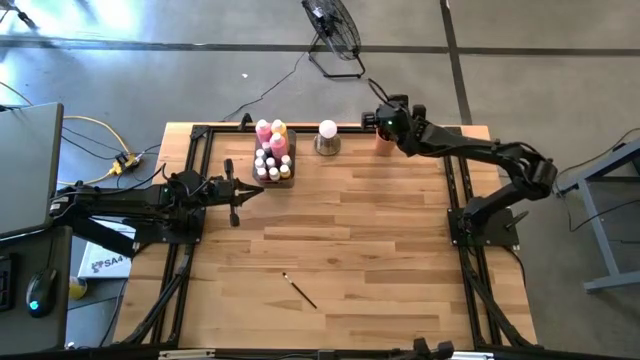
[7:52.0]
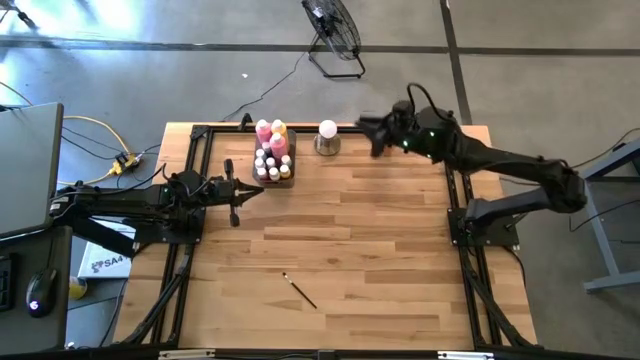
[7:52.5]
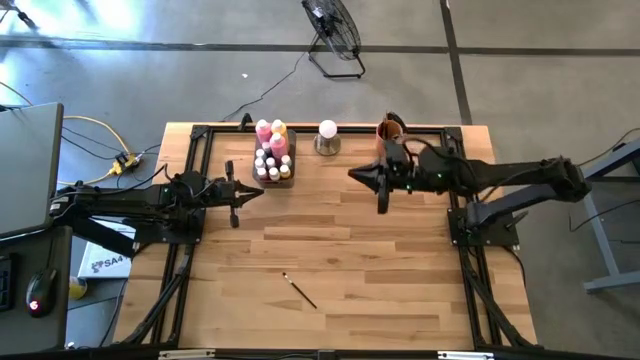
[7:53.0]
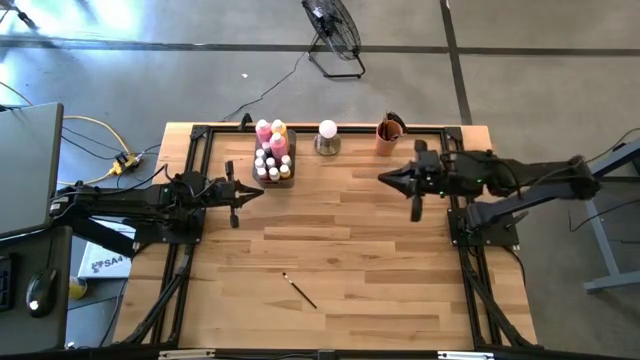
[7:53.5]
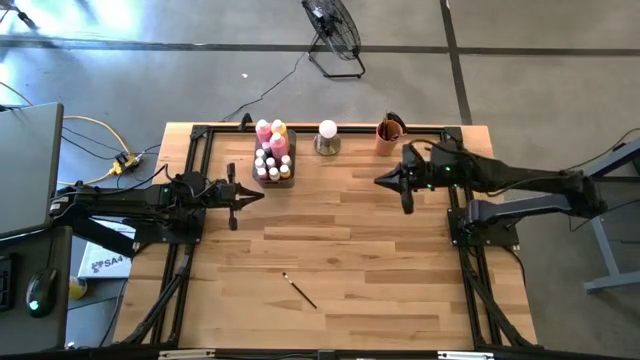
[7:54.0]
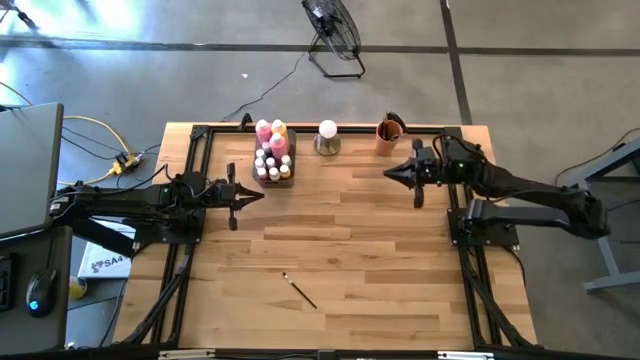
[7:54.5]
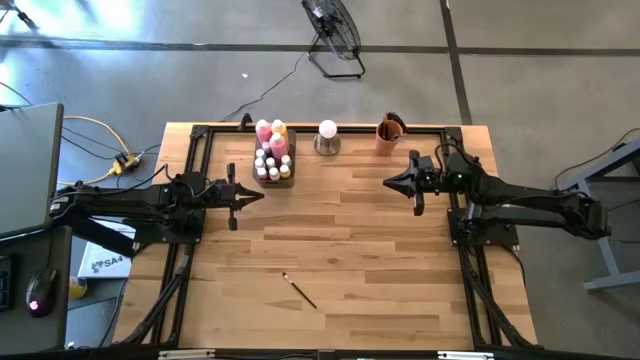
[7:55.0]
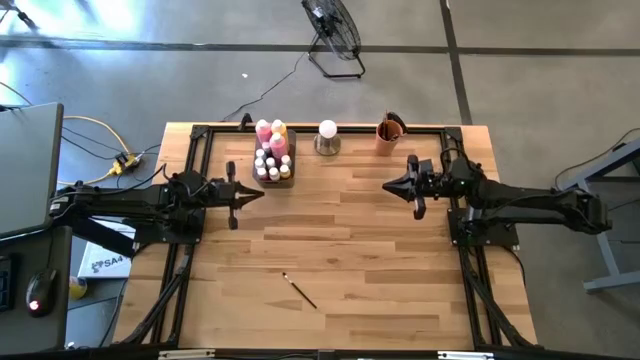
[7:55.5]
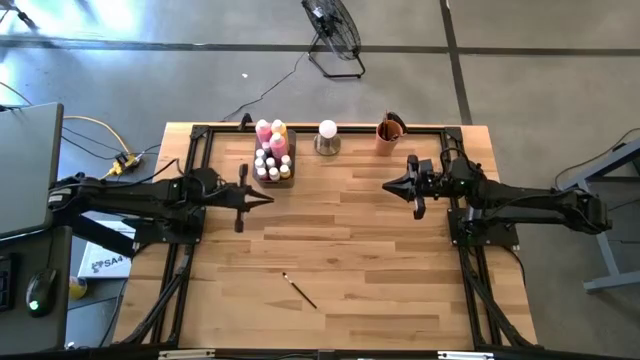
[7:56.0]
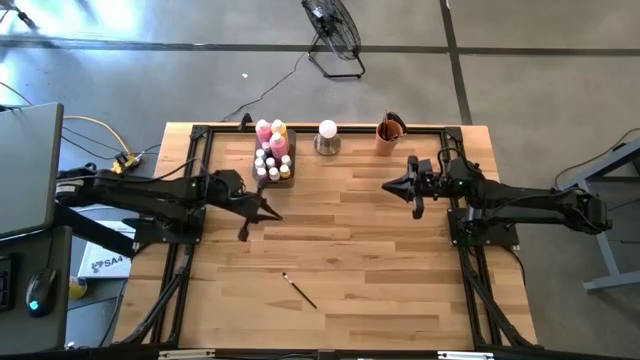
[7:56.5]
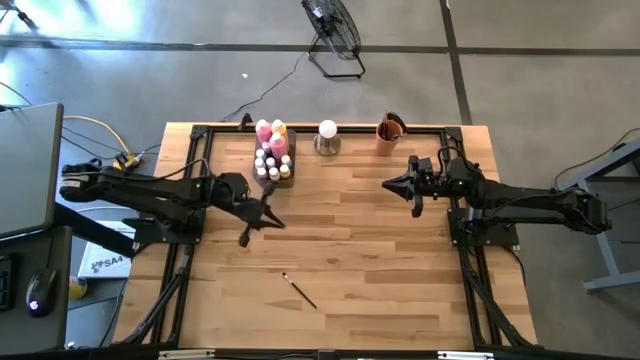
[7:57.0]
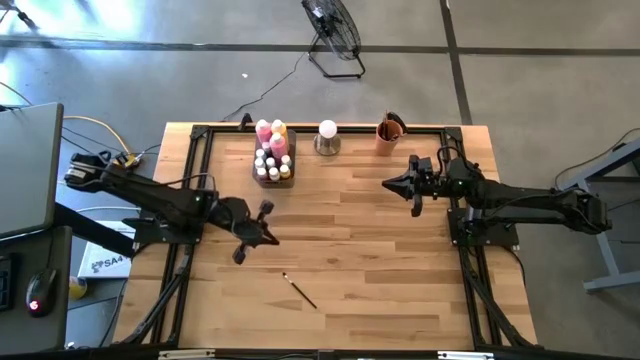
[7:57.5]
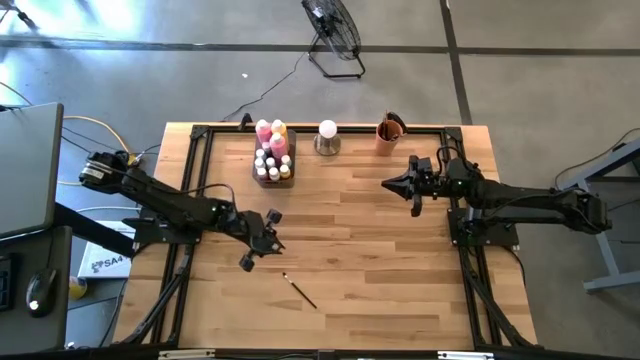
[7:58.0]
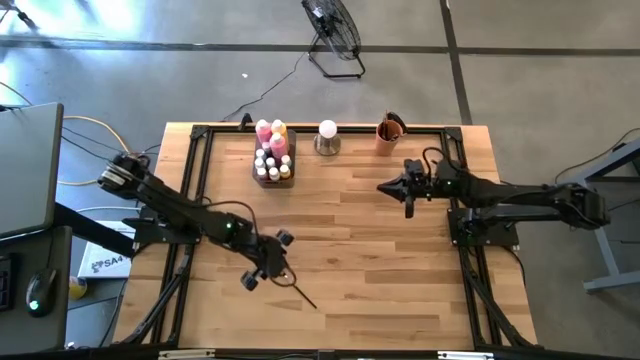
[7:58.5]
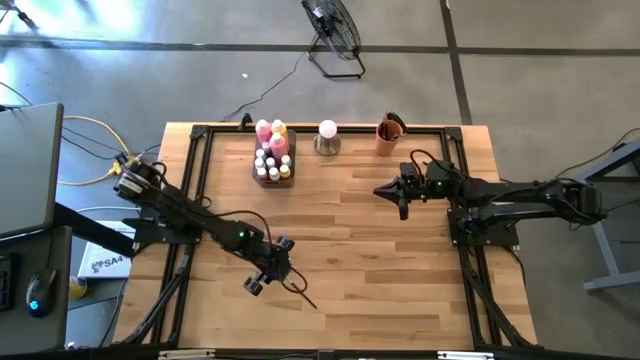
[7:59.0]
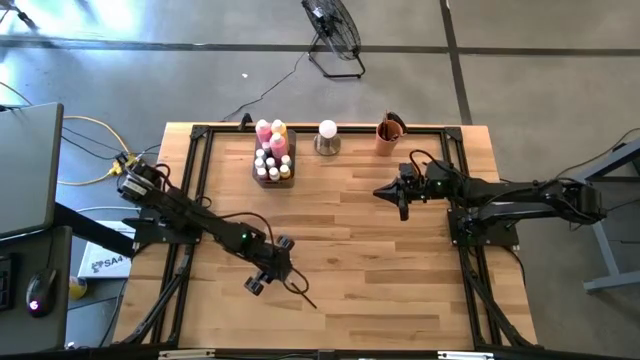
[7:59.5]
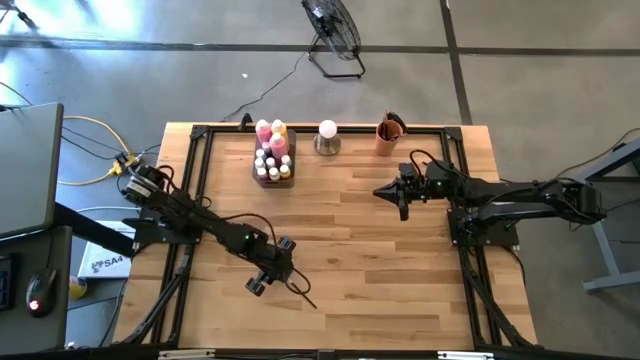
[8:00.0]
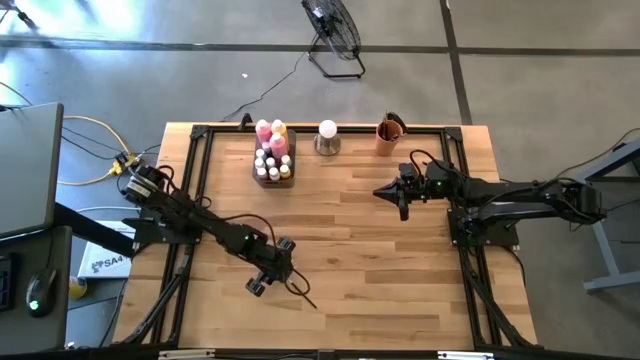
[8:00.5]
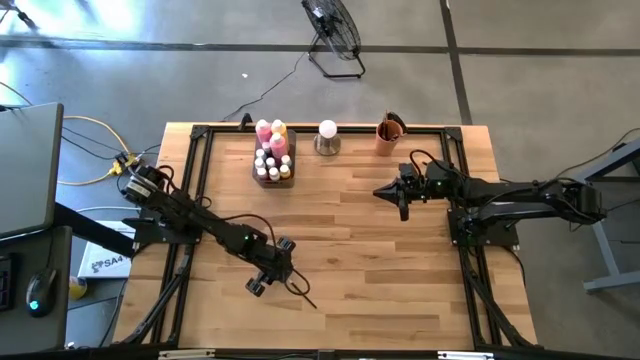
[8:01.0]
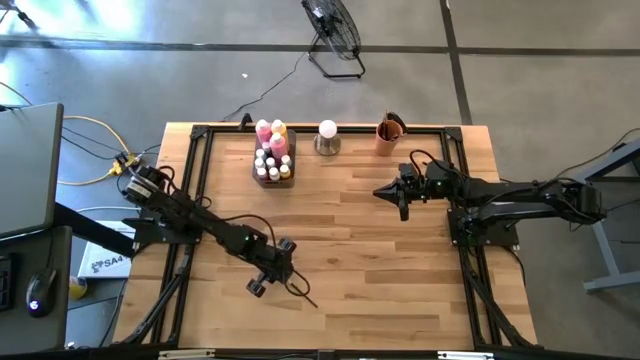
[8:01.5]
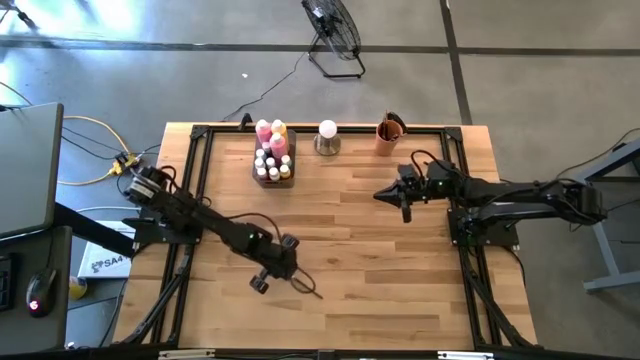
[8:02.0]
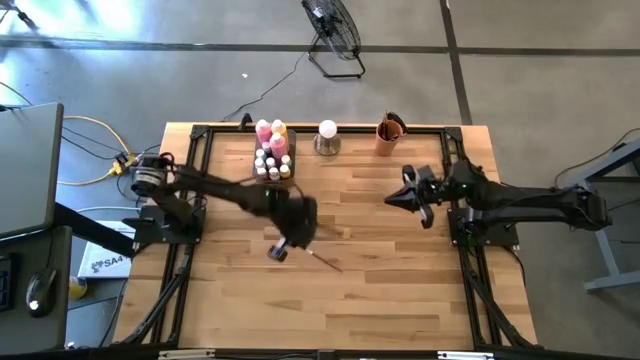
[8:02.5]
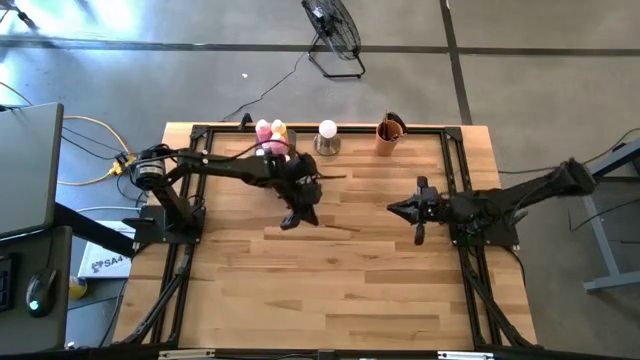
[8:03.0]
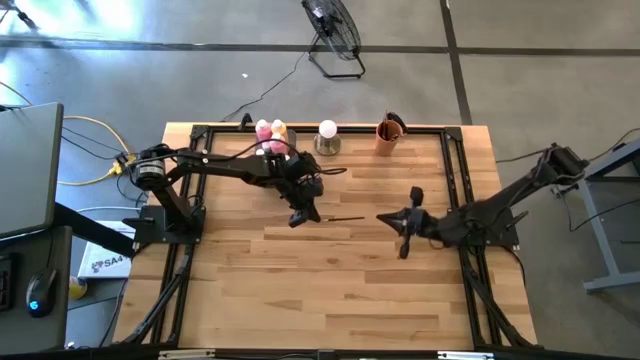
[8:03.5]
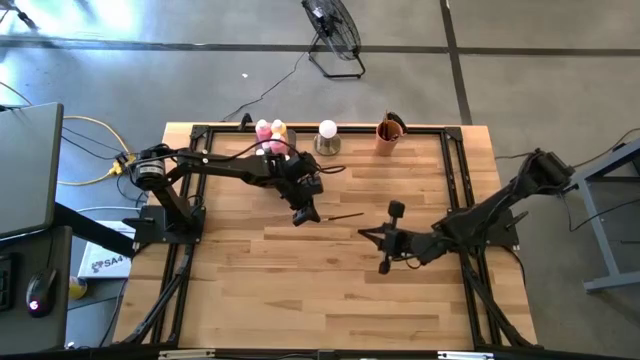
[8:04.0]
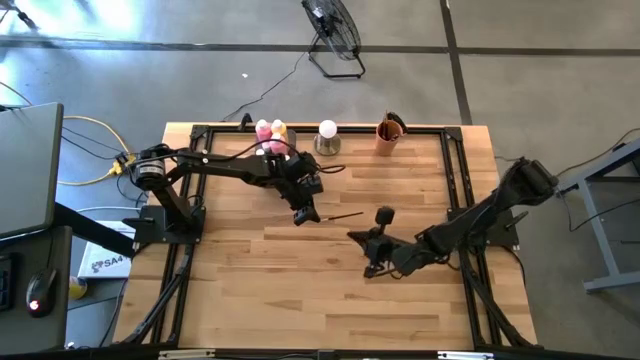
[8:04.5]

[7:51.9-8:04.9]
Task: Pick & Place Paint Supplies
Put the silver paintbrush into the orange cup

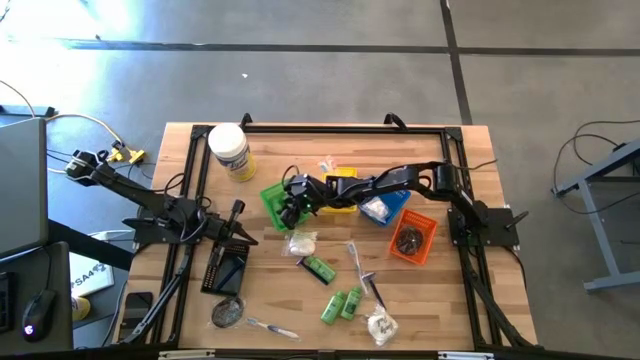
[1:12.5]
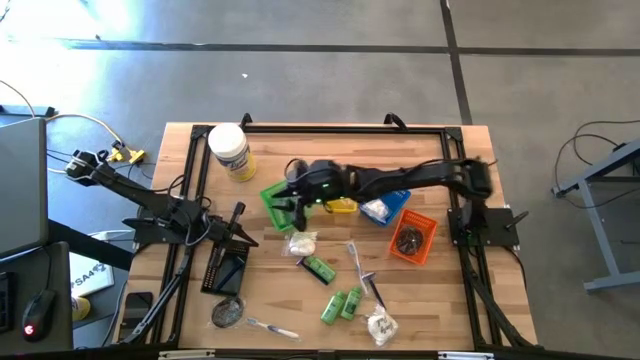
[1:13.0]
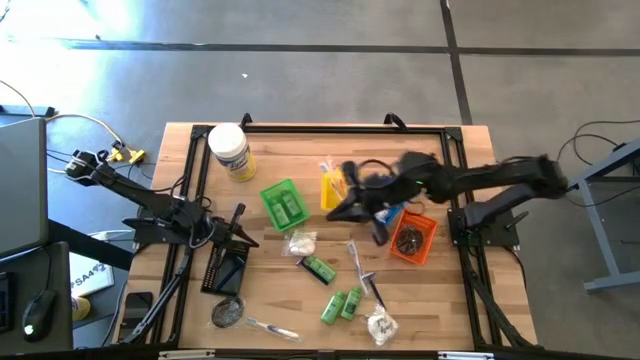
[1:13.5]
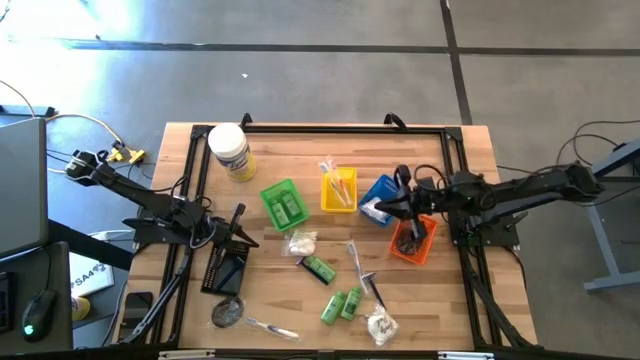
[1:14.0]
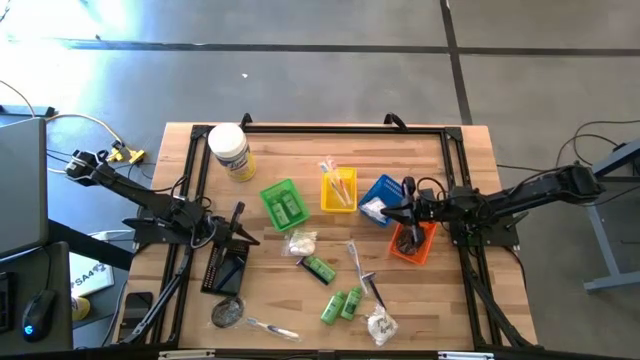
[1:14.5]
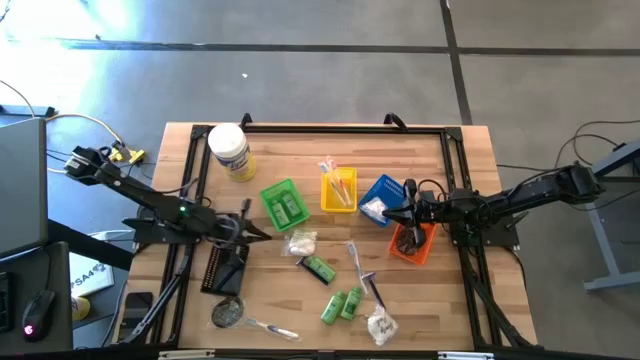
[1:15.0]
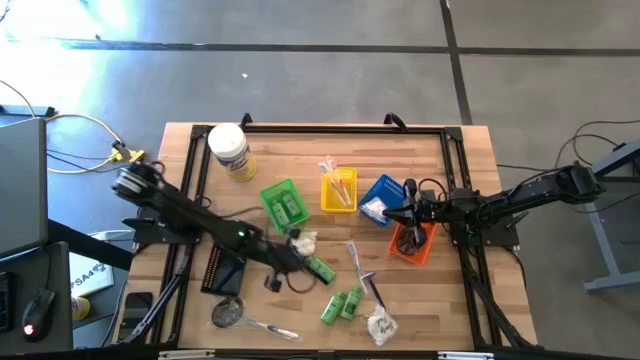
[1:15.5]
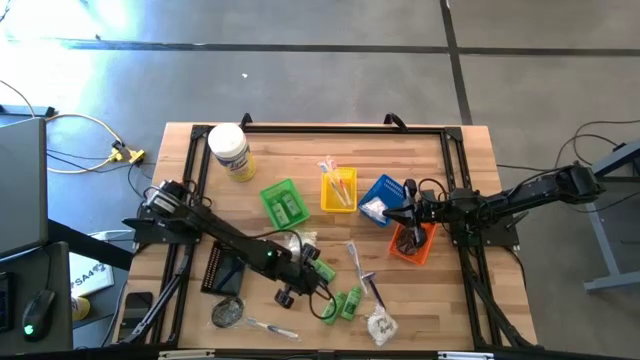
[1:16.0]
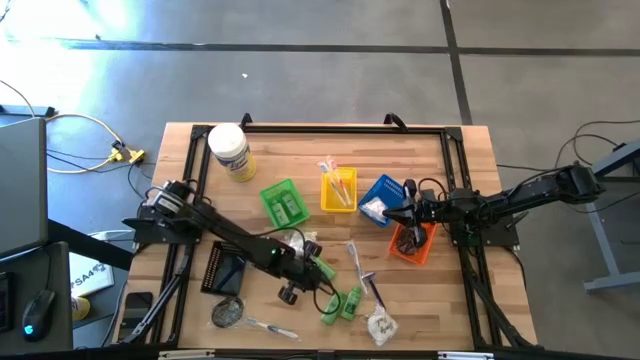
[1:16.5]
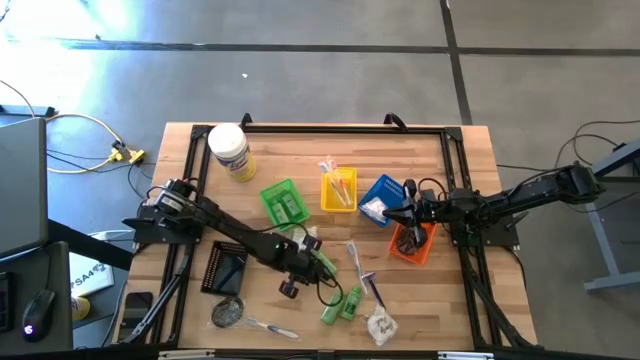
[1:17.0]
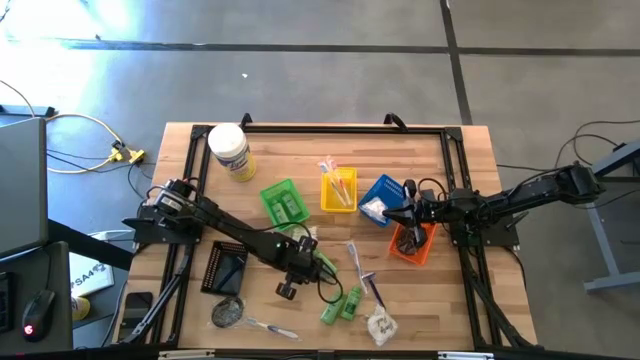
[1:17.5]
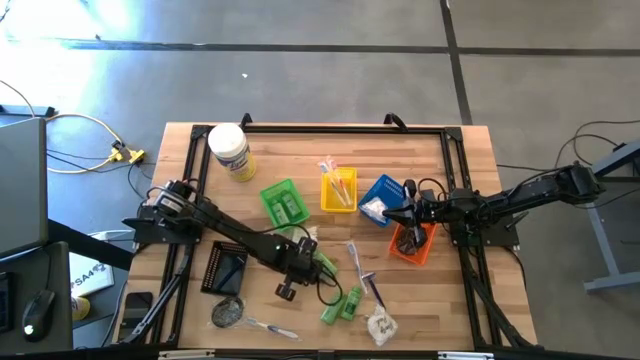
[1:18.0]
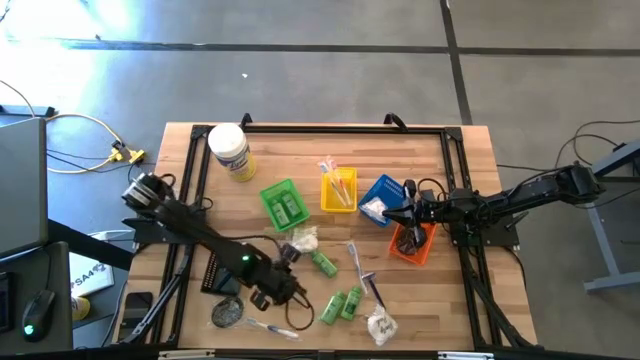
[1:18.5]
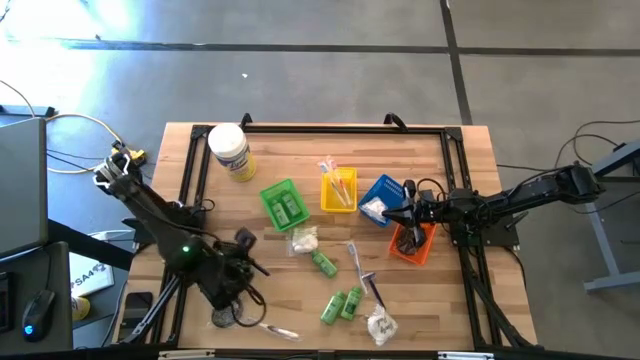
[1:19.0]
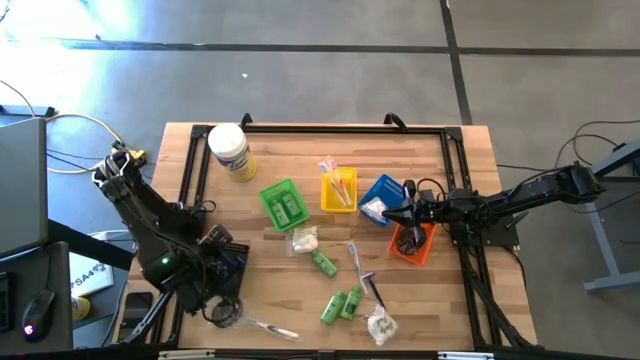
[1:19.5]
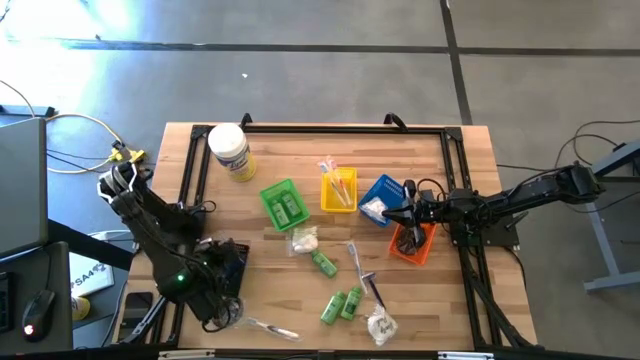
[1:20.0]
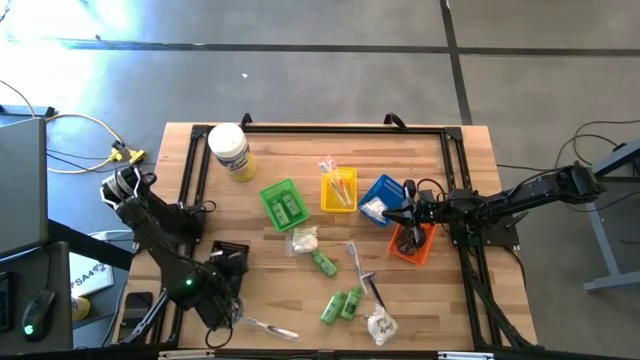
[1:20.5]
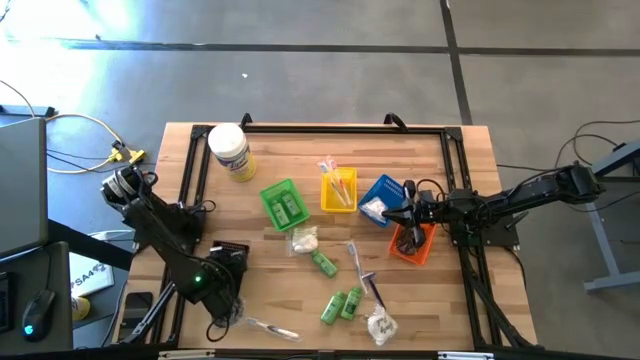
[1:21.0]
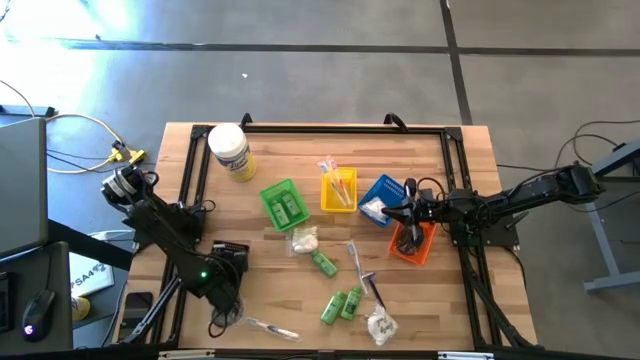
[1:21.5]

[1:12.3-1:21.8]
Task: Pick & Place Travel size toiletries
Put the left razor into the black bin
